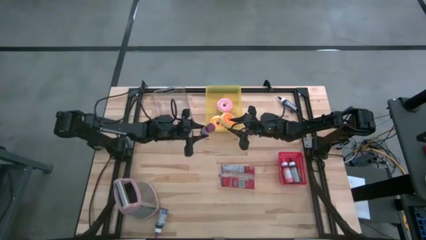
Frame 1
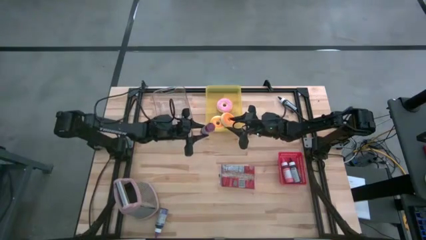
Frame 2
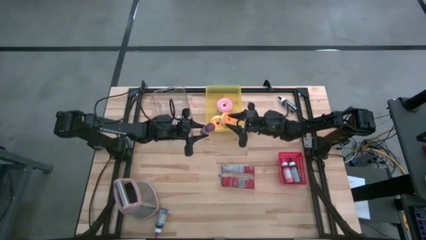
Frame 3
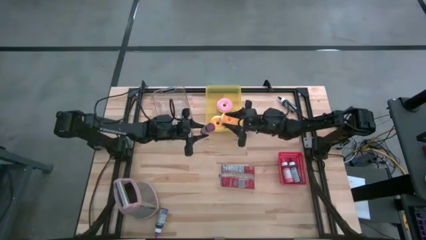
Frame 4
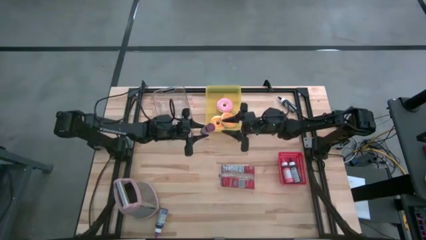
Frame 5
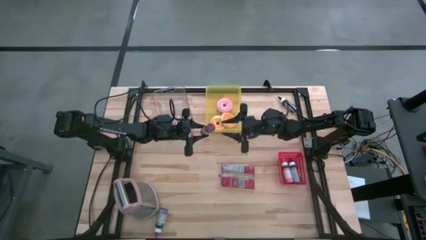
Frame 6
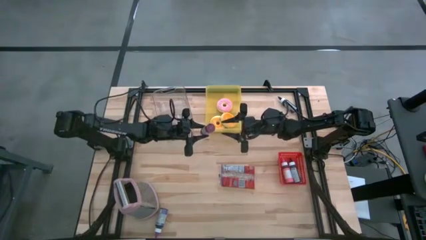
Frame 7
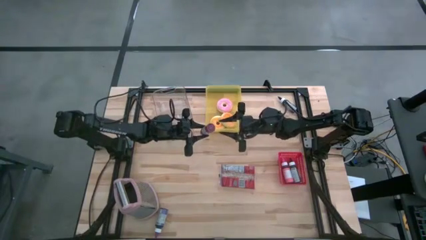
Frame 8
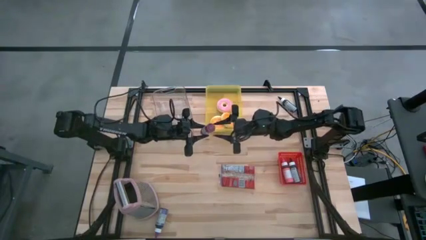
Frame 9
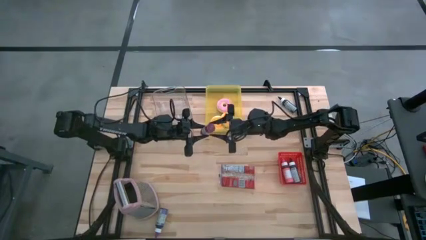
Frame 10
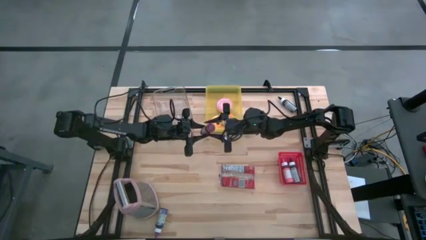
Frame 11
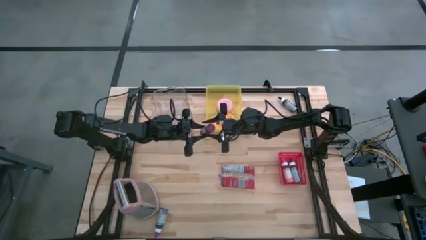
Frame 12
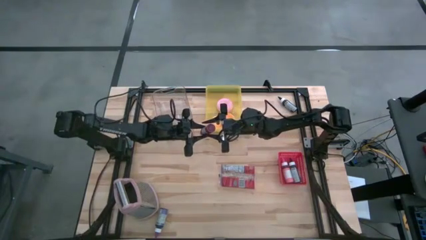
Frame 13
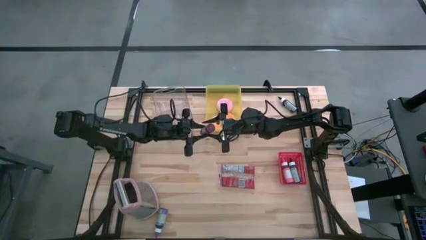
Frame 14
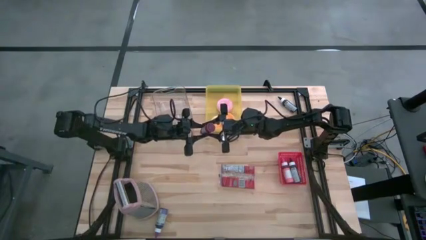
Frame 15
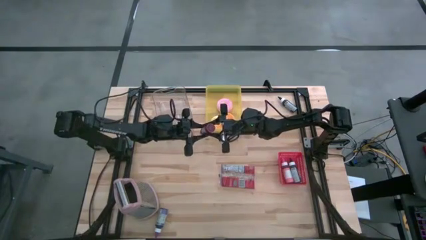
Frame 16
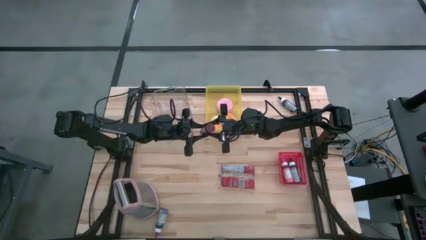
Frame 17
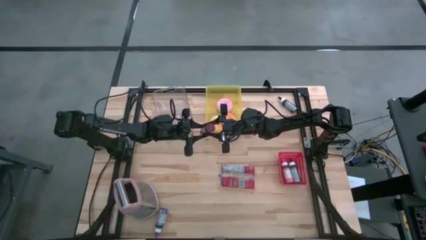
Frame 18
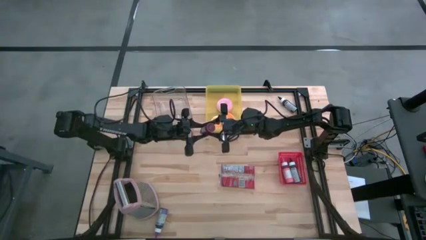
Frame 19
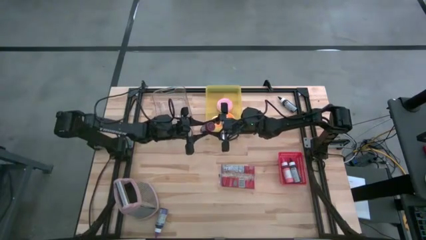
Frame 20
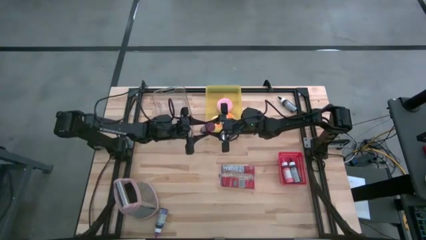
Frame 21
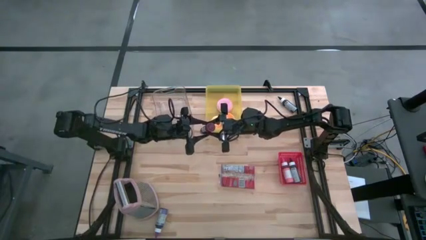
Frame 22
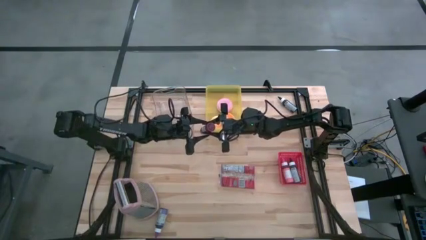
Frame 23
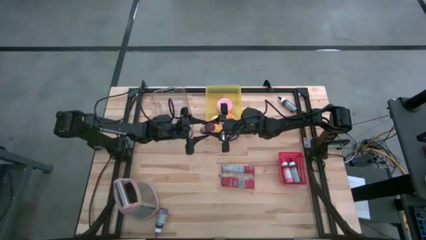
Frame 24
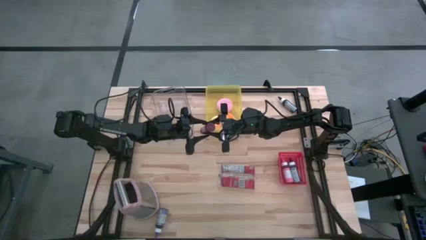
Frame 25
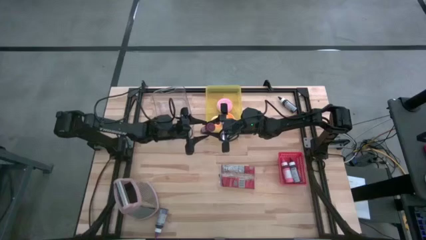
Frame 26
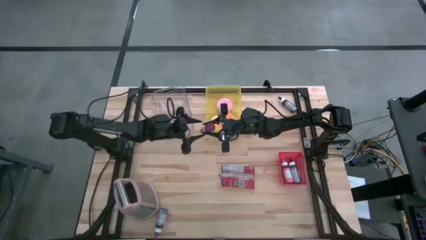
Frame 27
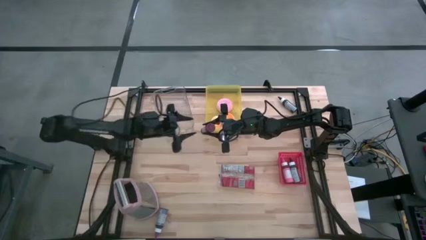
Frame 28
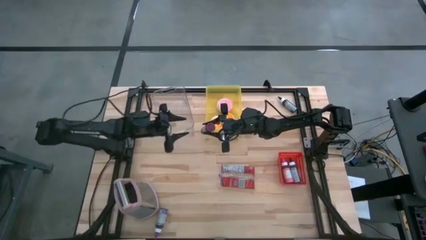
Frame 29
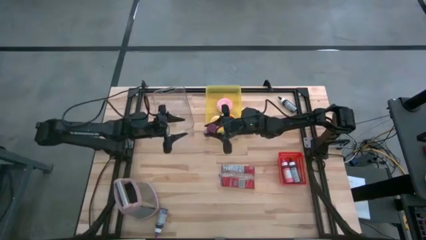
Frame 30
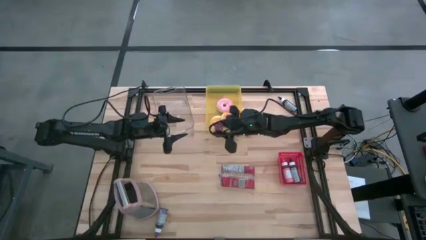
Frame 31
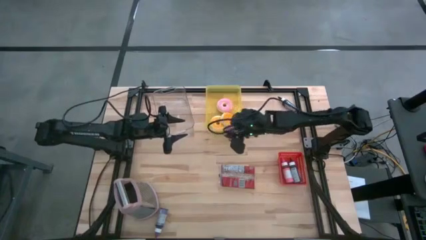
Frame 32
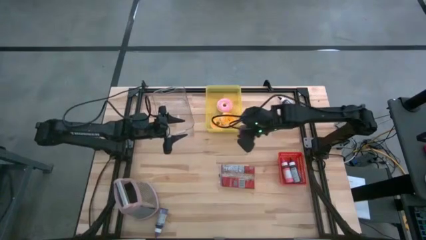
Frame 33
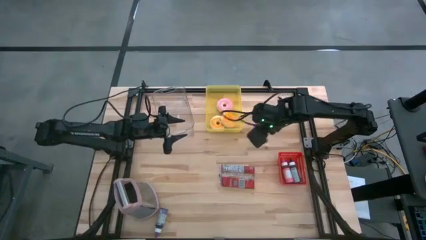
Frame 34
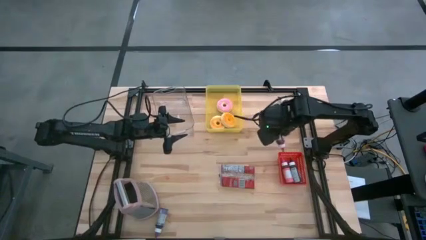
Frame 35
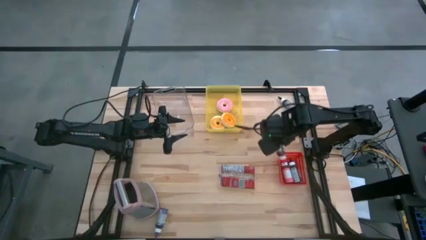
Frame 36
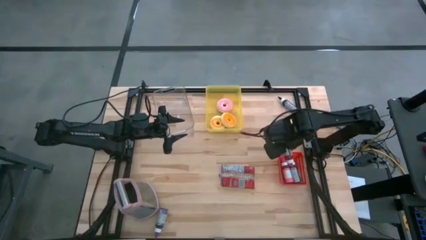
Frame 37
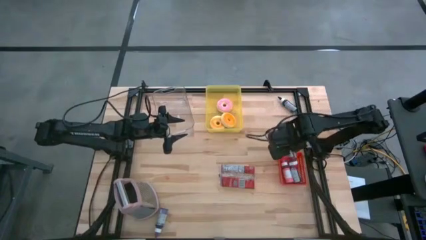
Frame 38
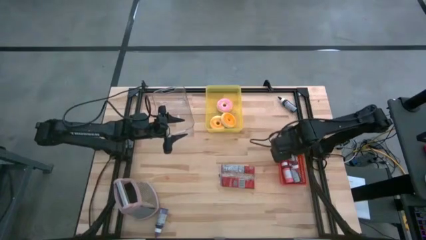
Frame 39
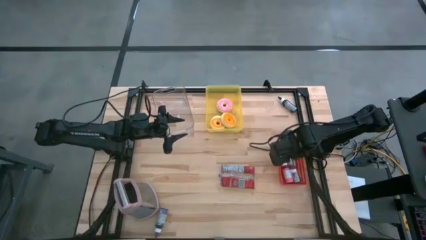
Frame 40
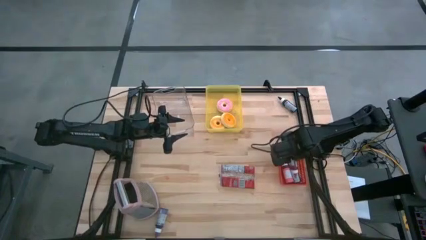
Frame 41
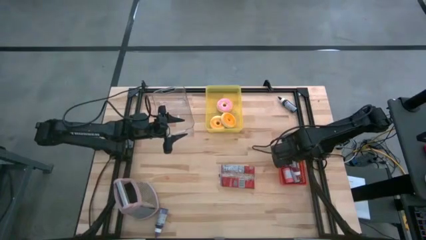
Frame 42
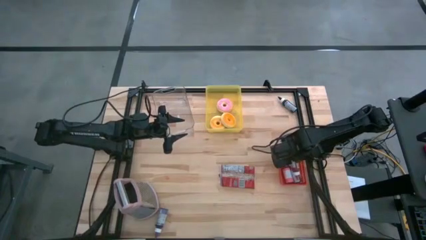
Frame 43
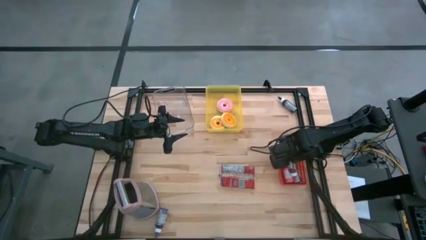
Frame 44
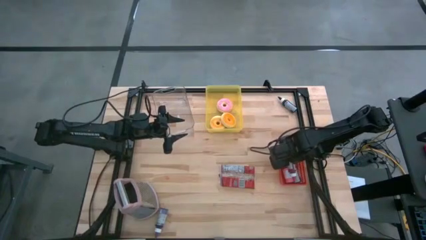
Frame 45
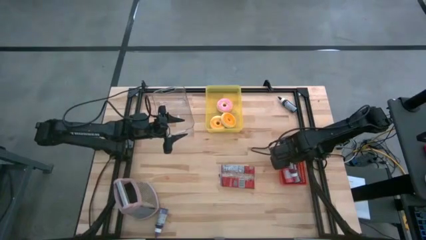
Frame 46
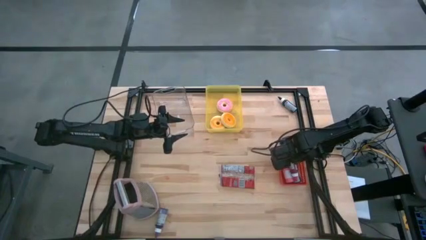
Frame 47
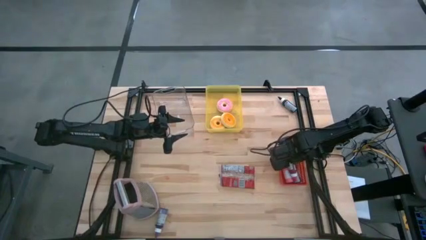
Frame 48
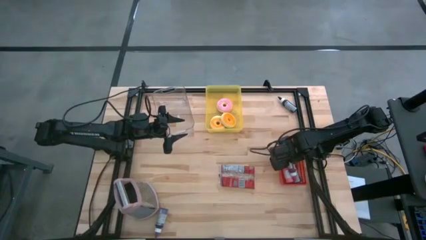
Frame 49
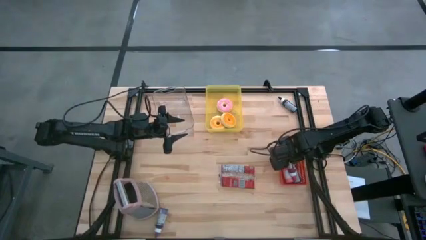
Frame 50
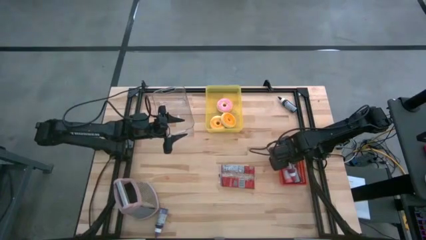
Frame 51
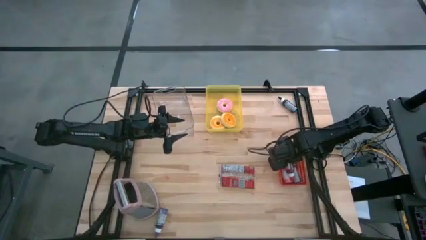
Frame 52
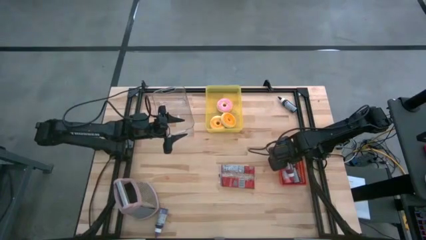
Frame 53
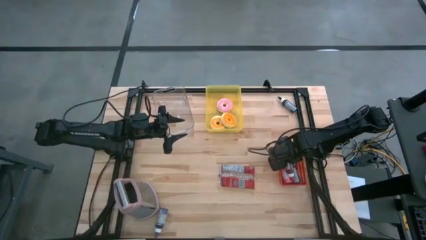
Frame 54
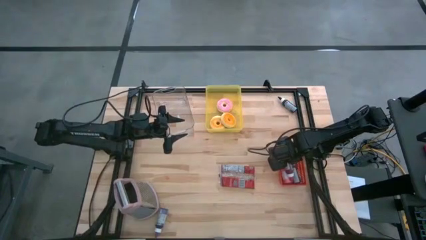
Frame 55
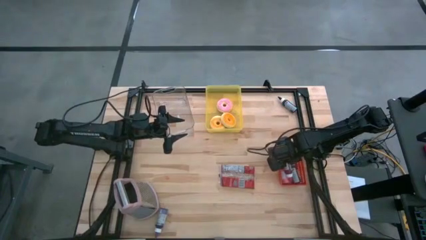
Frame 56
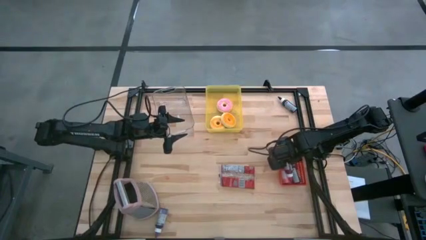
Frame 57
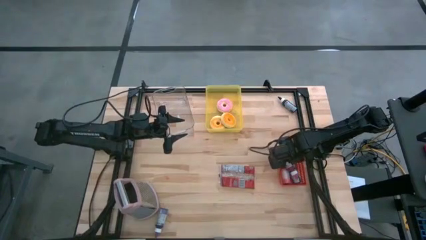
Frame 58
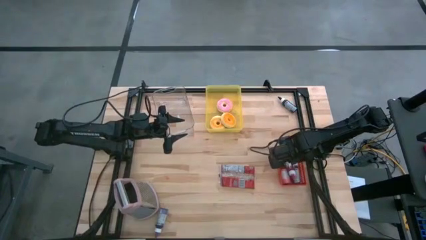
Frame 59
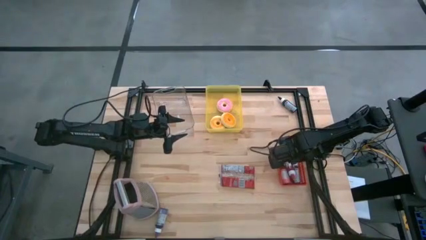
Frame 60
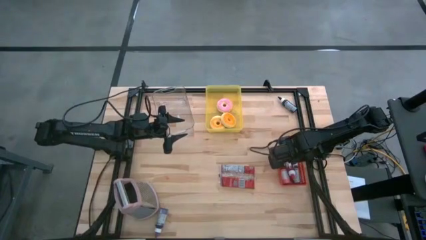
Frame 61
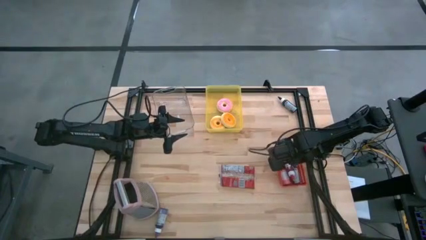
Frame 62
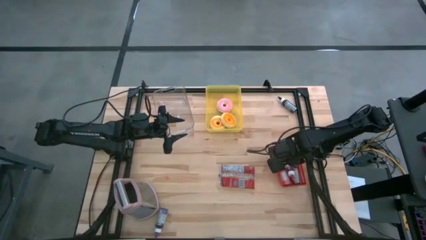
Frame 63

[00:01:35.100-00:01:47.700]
Task: Pick & Place Food Item
Put the red food coloring bottle into the red bin
